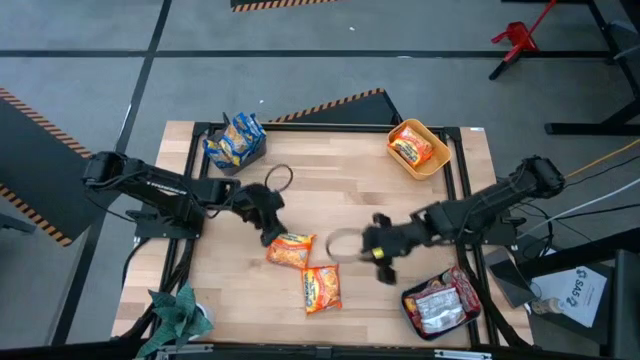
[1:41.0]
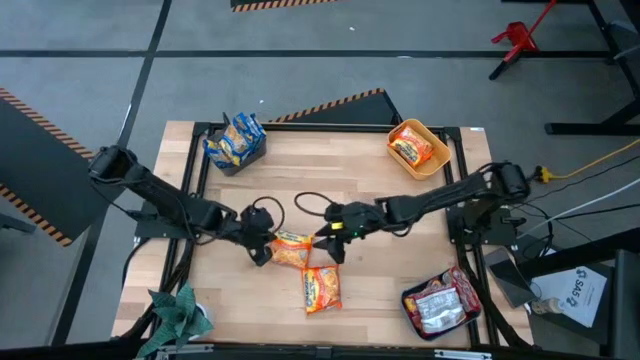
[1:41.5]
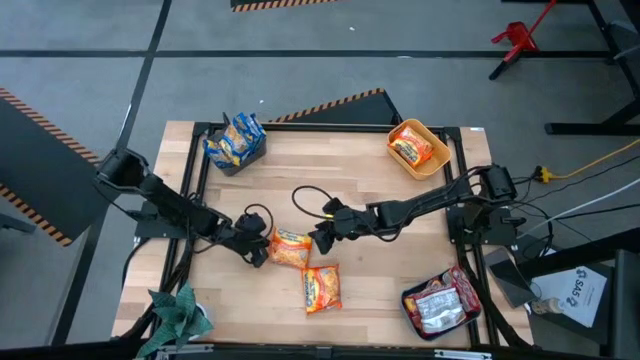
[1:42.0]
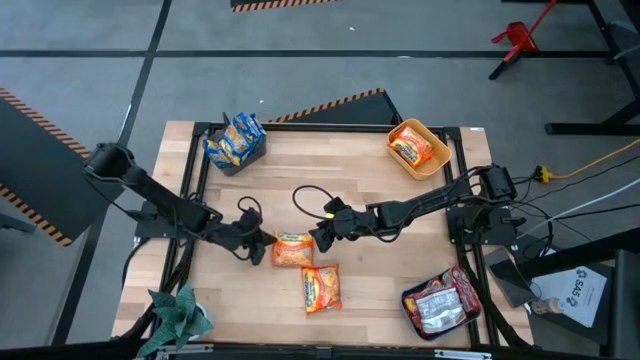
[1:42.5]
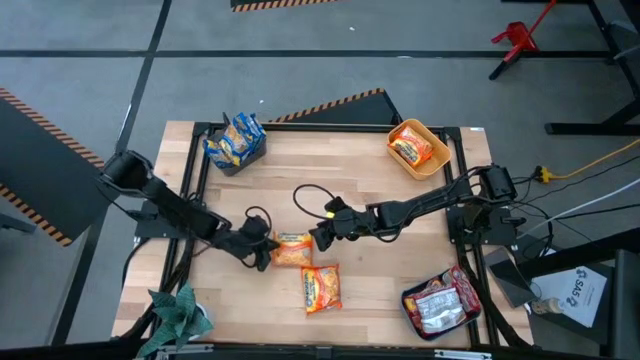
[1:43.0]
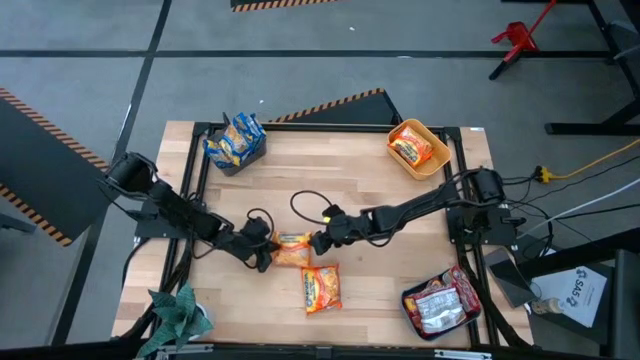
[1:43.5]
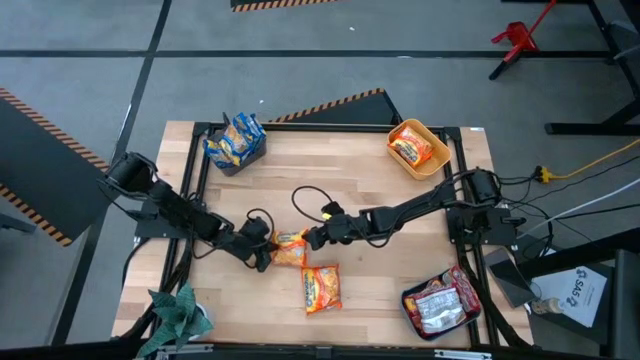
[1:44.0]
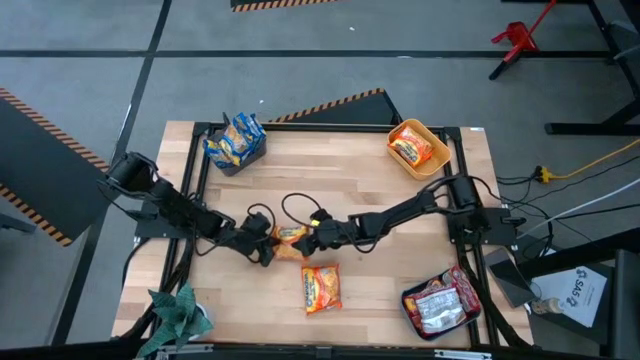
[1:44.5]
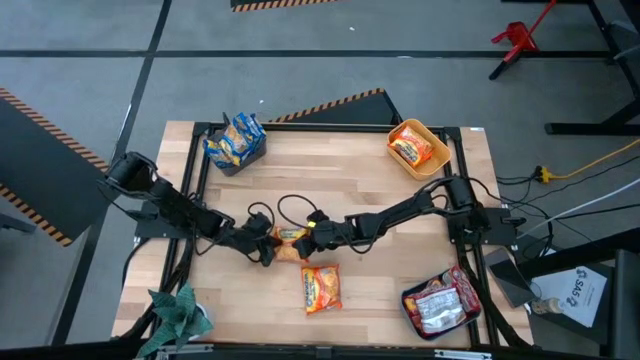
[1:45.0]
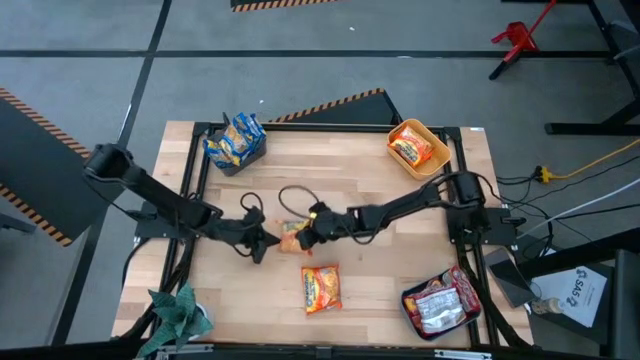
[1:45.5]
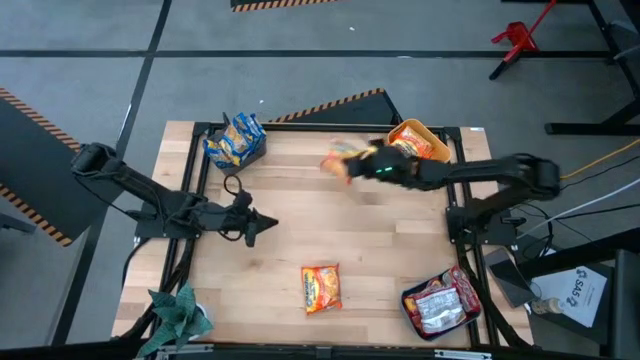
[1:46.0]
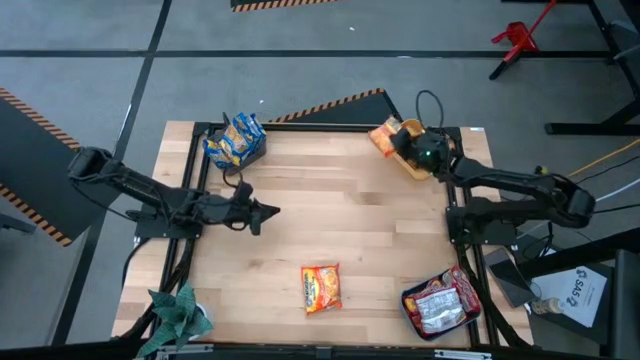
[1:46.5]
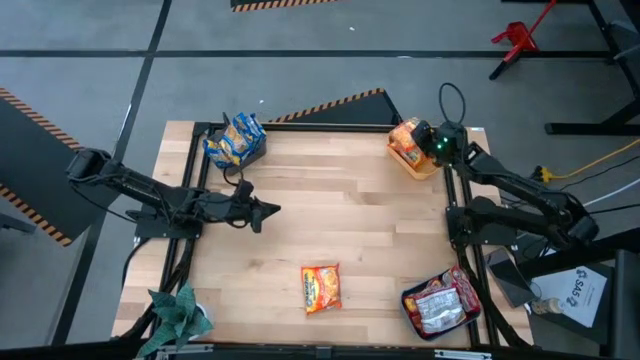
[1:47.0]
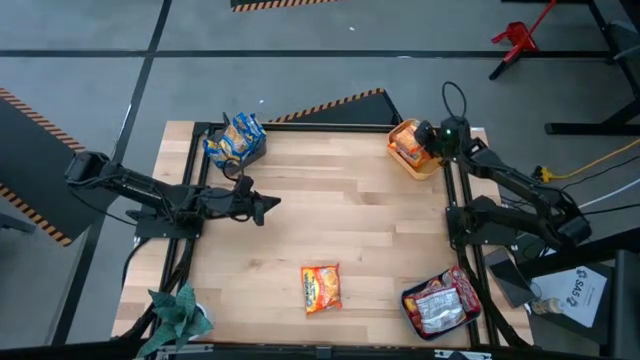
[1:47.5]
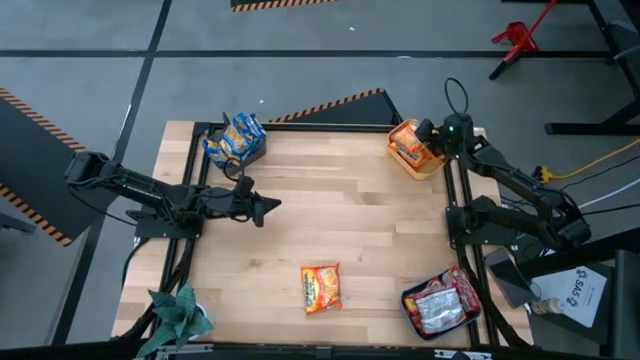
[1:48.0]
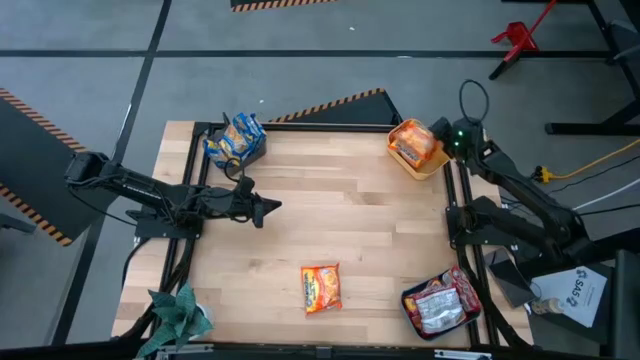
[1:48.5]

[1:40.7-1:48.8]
Task: Sort Maruchan noodles
Put the orange noodle pack into the yellow bin

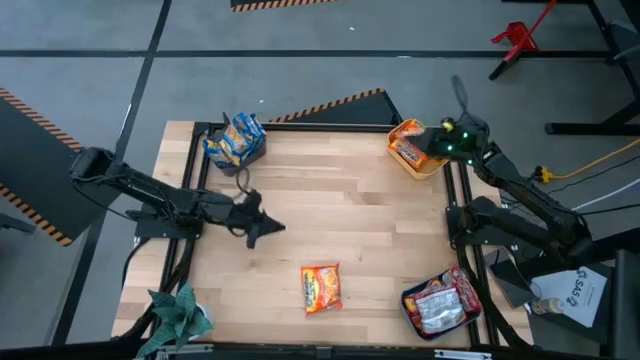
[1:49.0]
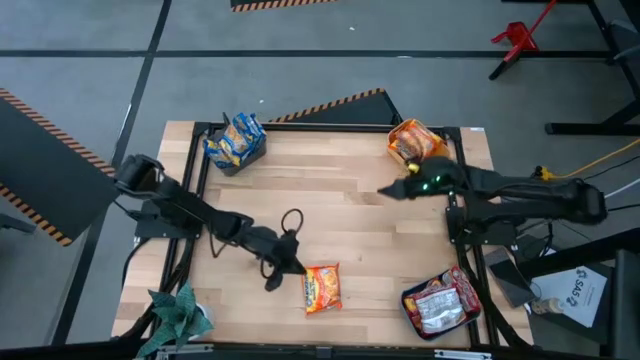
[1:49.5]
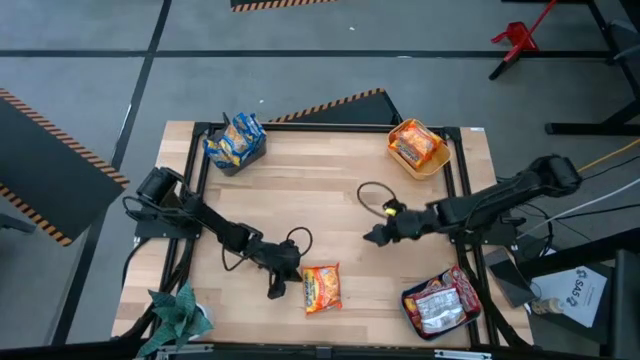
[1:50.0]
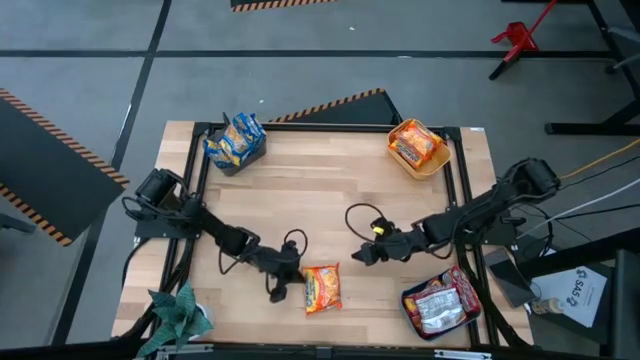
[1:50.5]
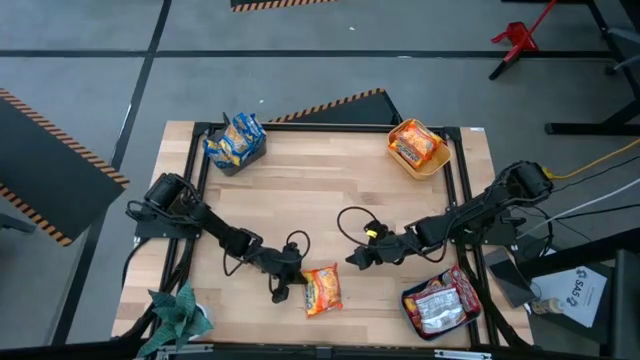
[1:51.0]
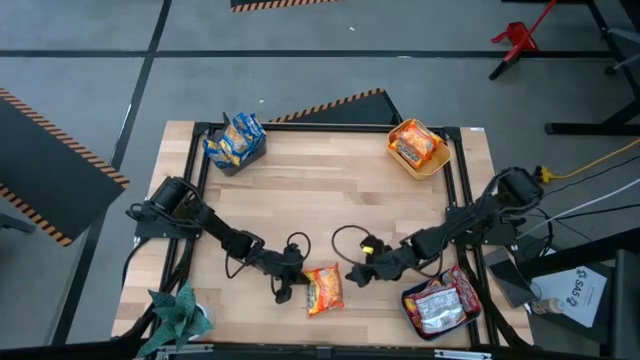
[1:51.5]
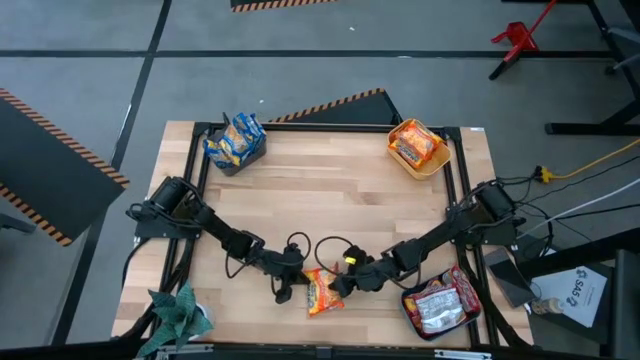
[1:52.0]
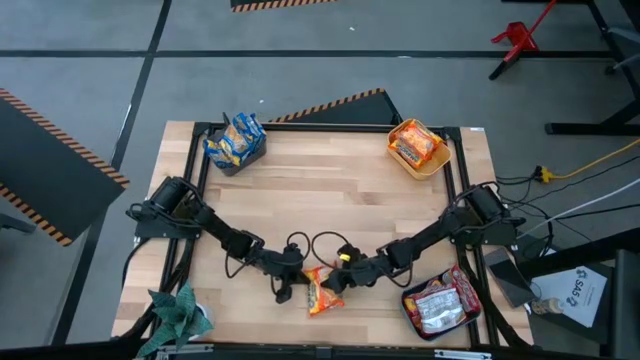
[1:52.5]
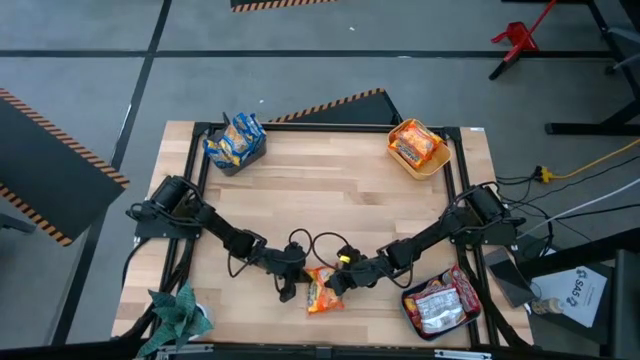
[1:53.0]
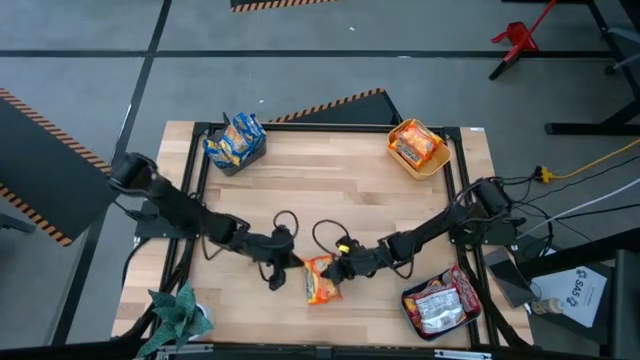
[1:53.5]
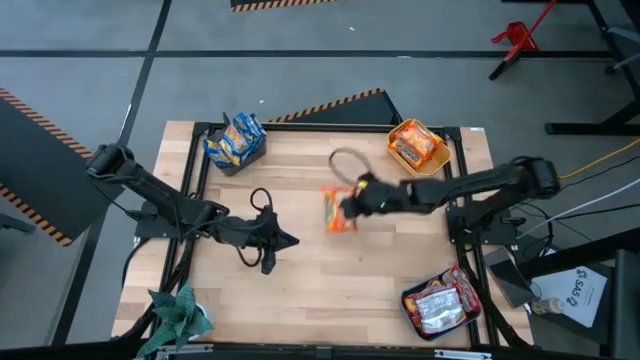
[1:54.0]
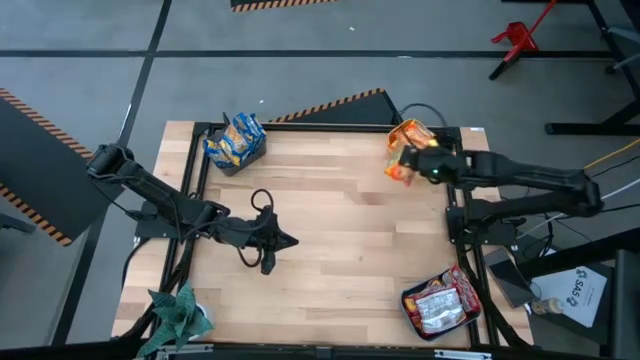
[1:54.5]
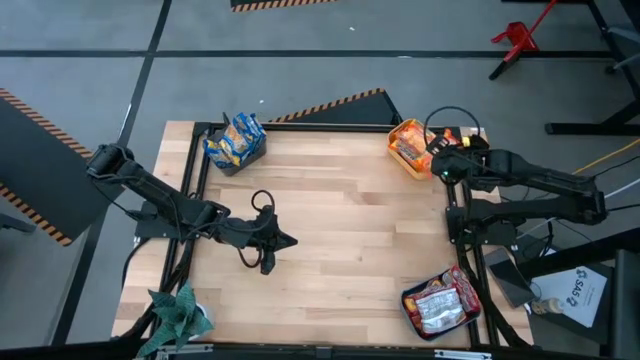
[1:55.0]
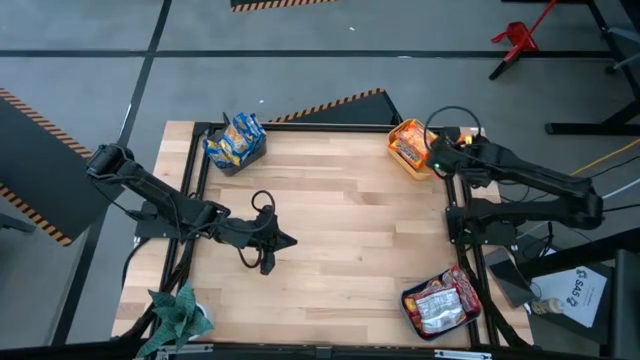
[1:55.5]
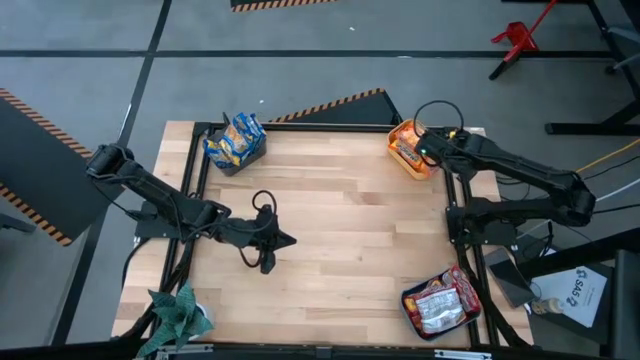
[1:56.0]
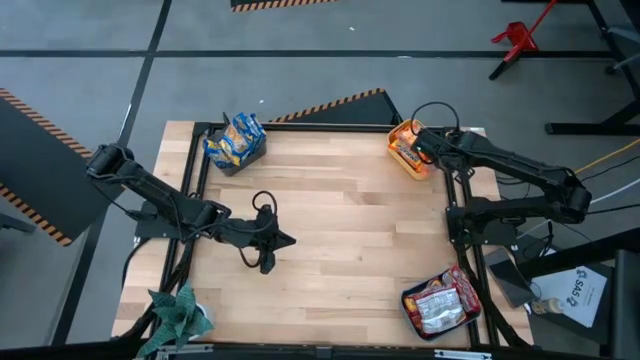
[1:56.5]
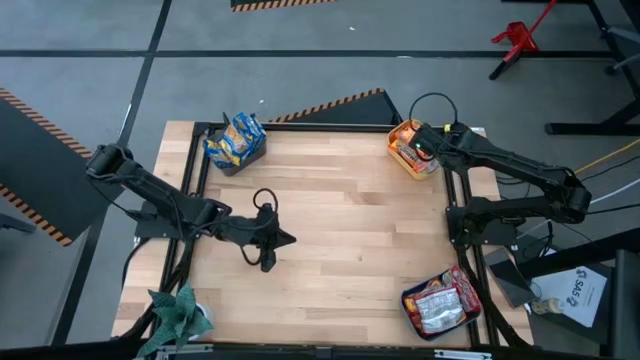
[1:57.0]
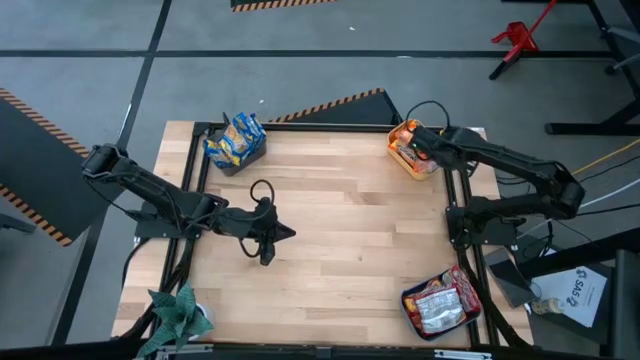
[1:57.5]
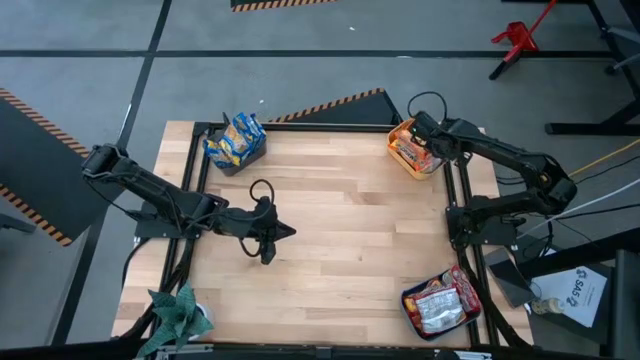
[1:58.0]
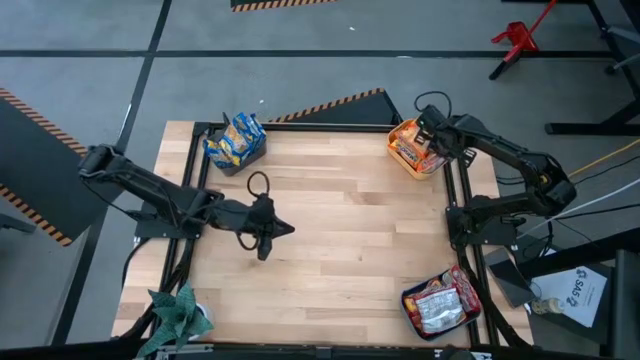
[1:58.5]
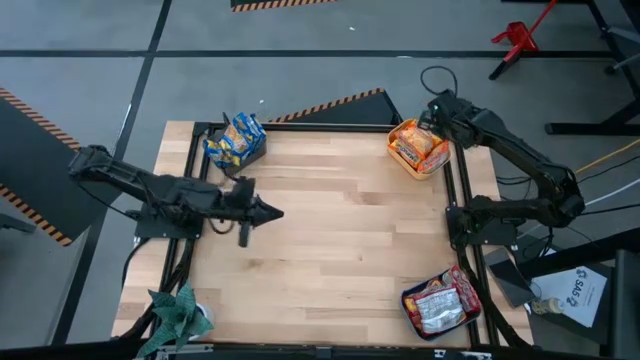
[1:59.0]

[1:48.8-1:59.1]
Put the orange noodle pack into the yellow bin

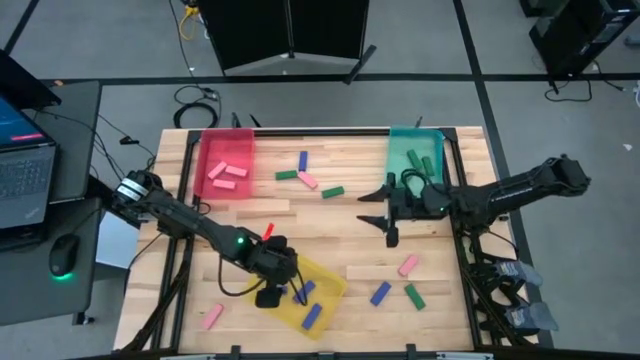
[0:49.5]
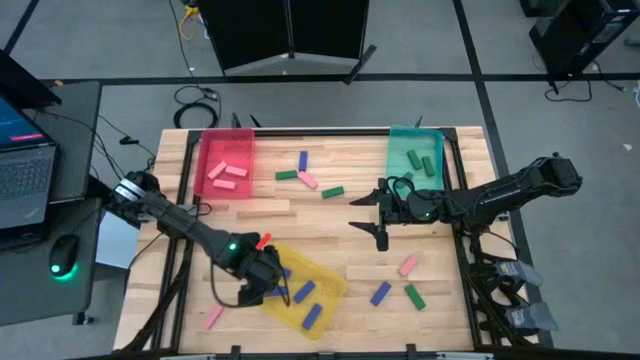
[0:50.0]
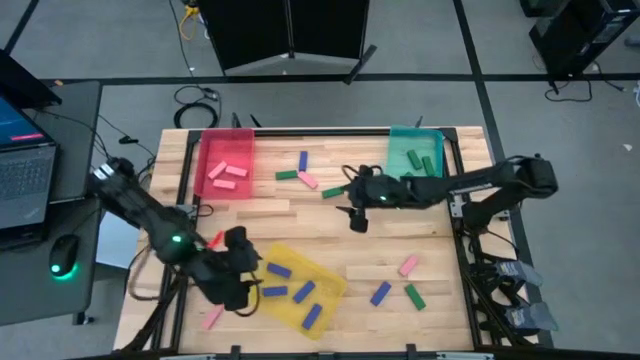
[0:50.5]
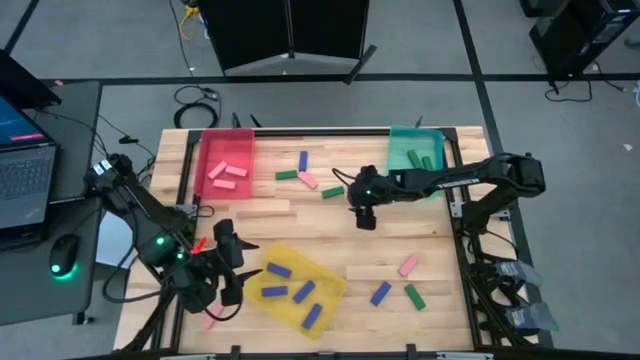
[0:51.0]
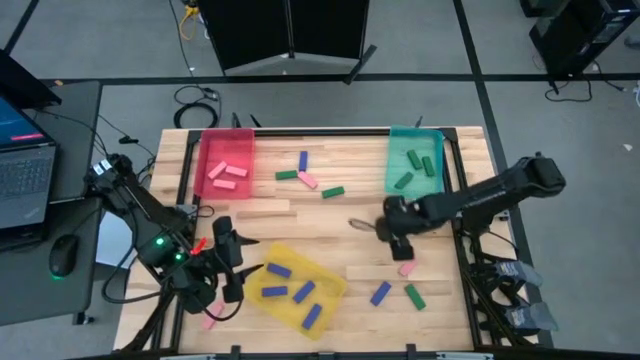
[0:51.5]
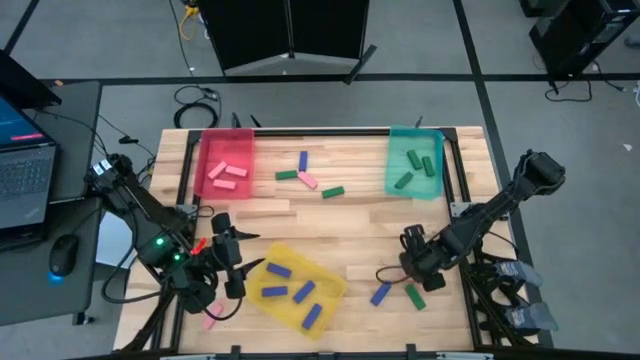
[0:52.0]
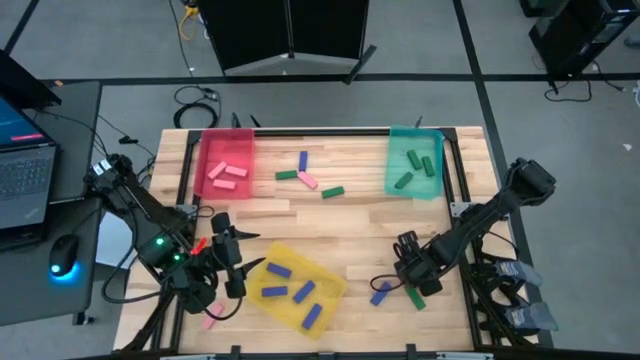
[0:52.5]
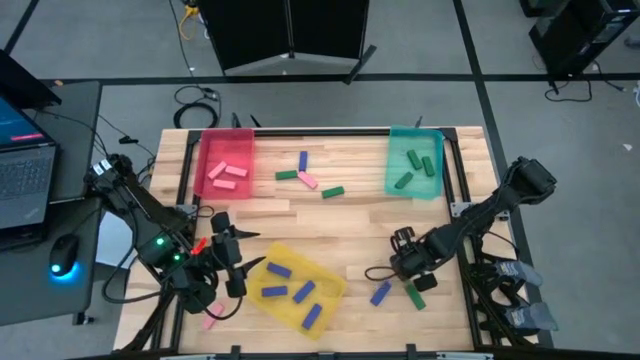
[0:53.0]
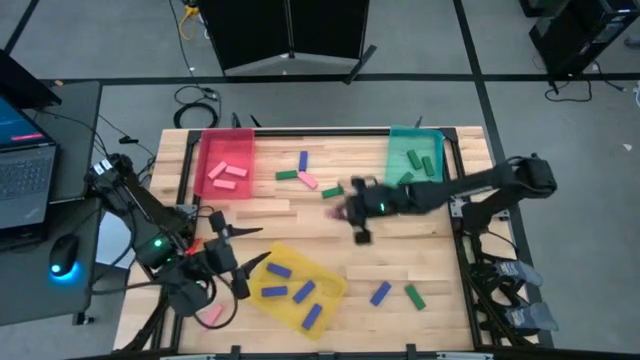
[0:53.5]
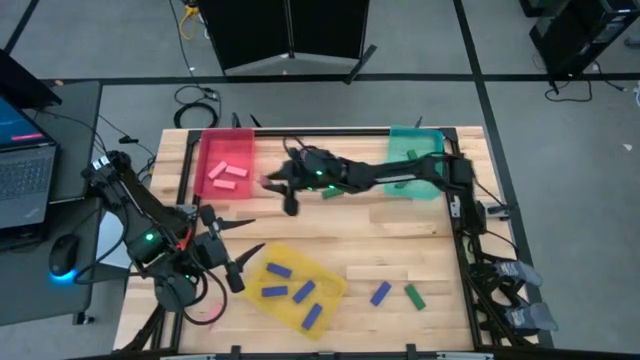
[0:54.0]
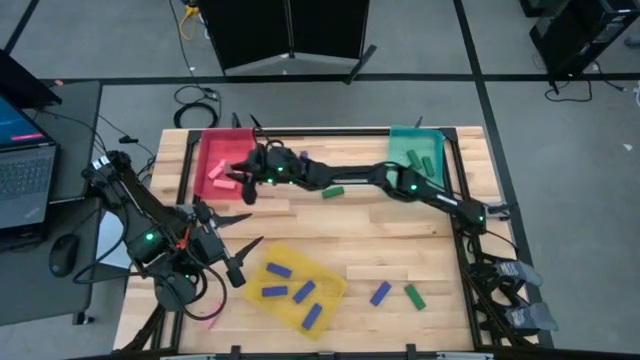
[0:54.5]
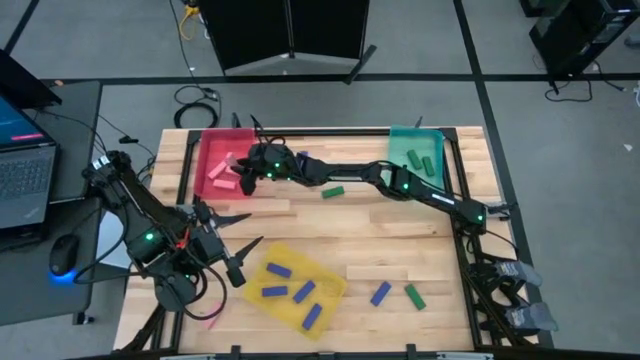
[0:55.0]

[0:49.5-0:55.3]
Task: Sort blocks
Put the pink block into the red bin
